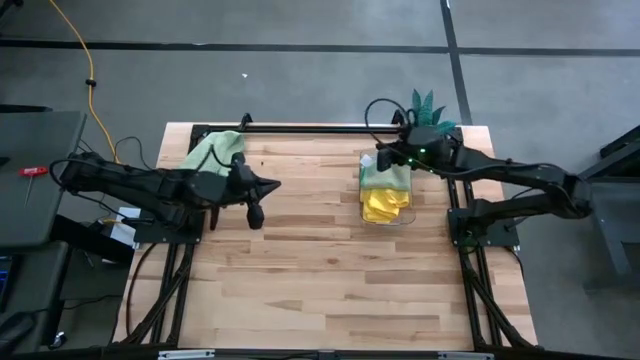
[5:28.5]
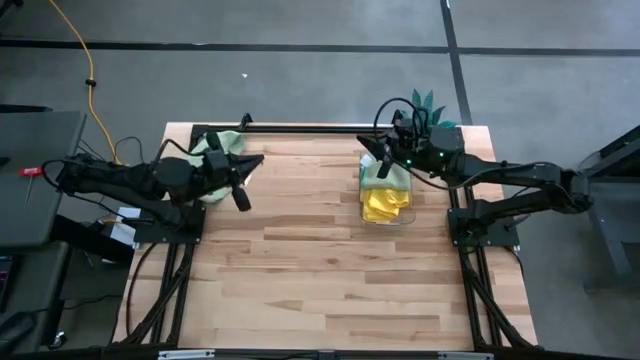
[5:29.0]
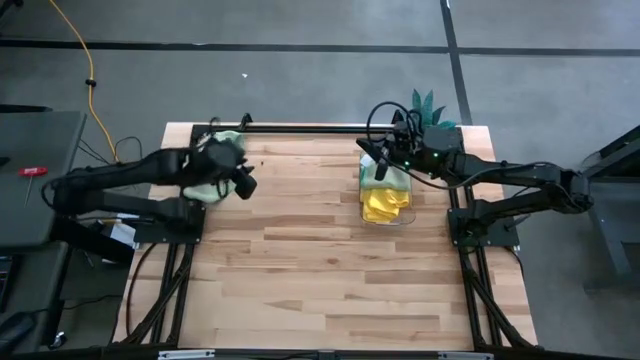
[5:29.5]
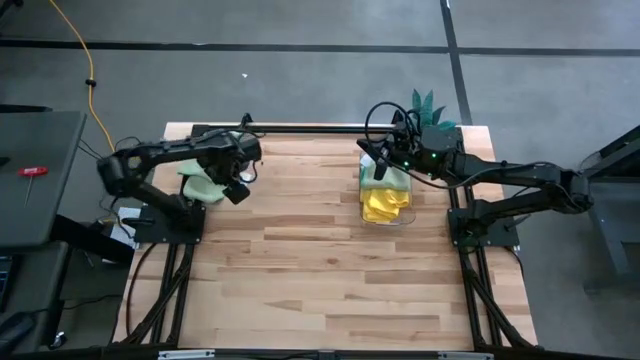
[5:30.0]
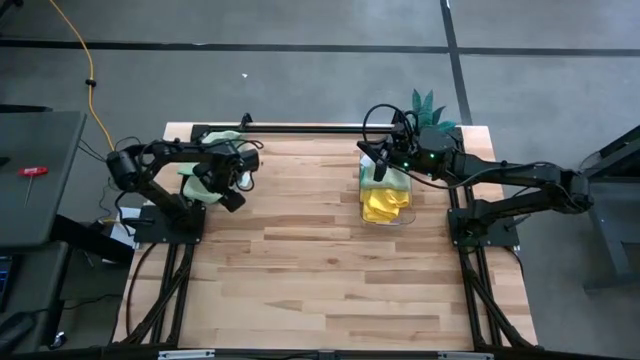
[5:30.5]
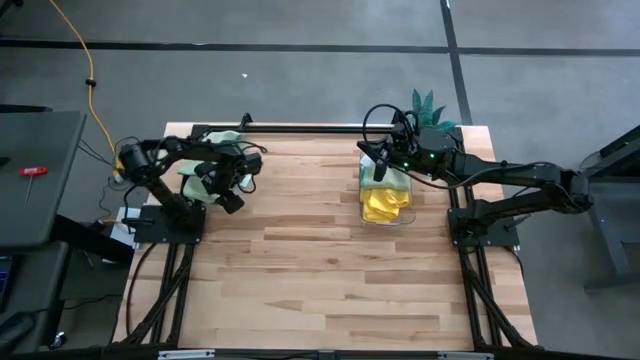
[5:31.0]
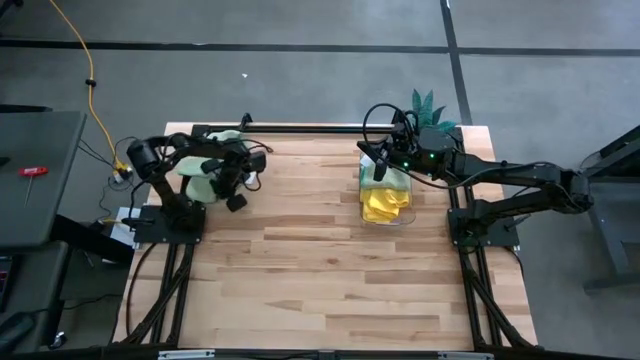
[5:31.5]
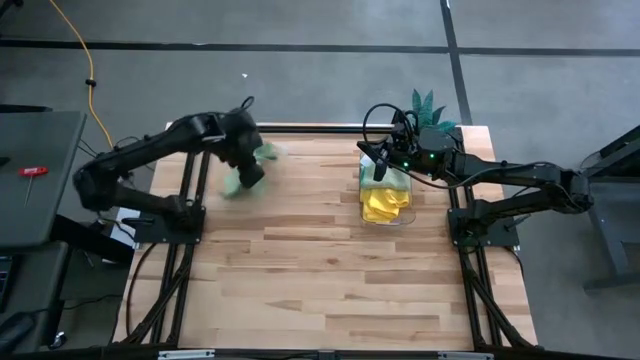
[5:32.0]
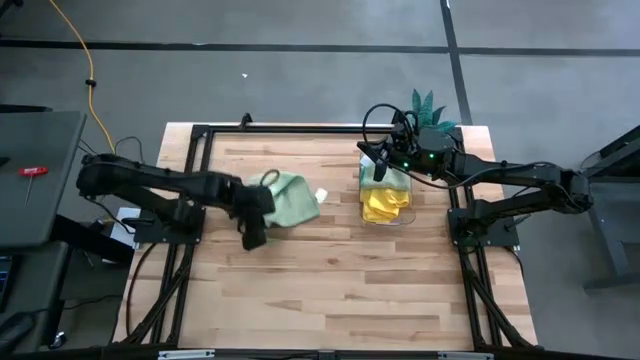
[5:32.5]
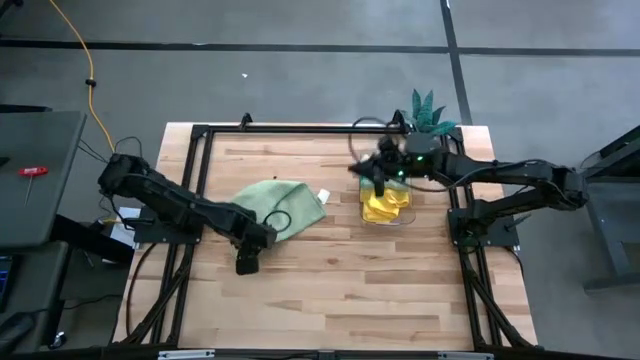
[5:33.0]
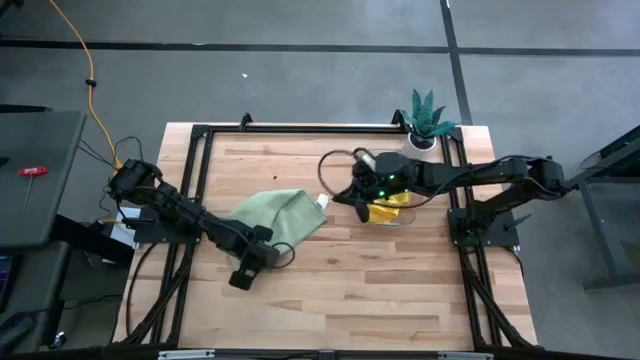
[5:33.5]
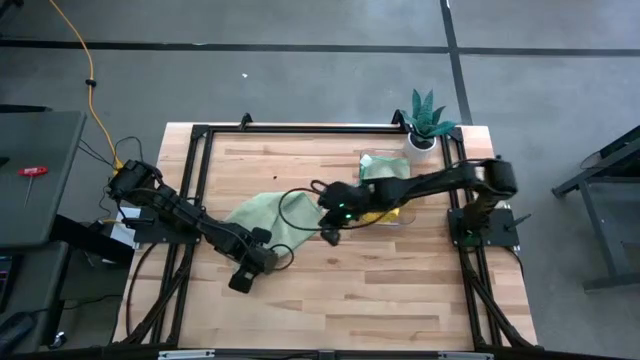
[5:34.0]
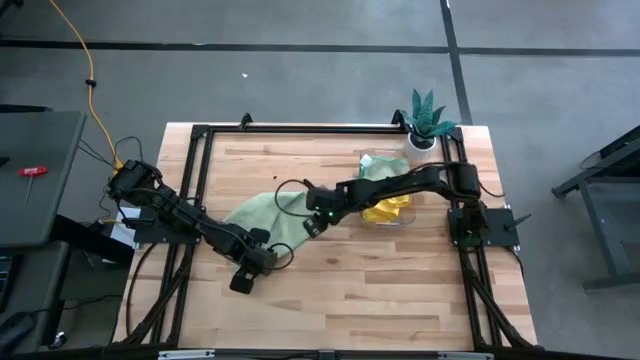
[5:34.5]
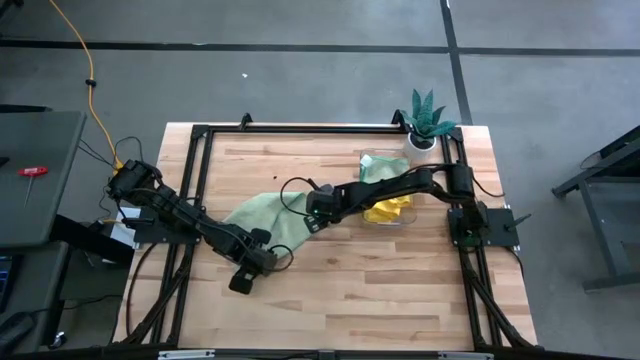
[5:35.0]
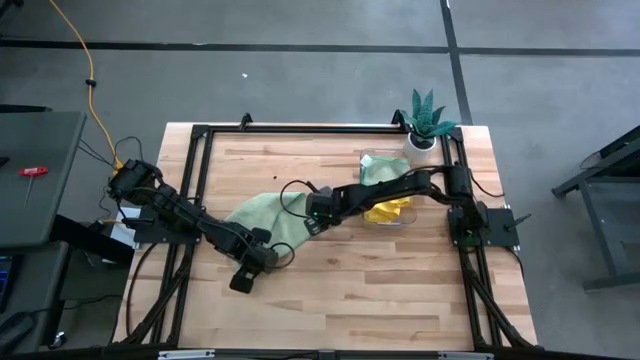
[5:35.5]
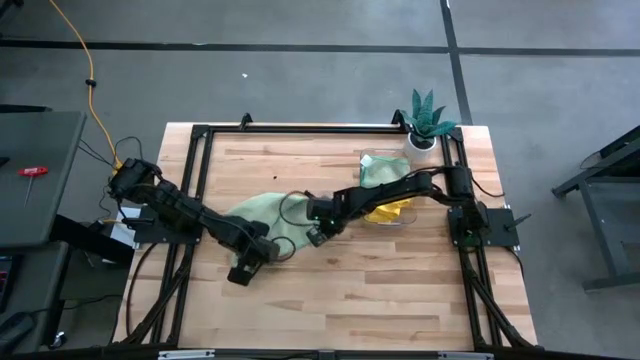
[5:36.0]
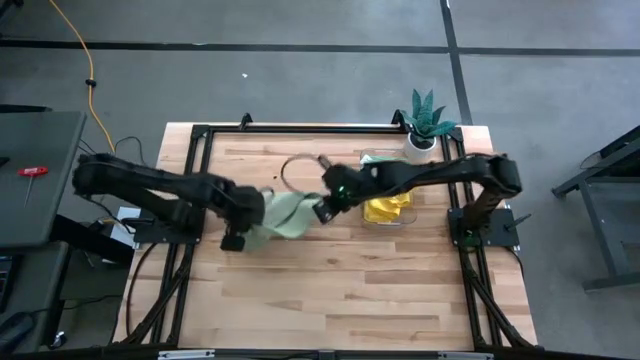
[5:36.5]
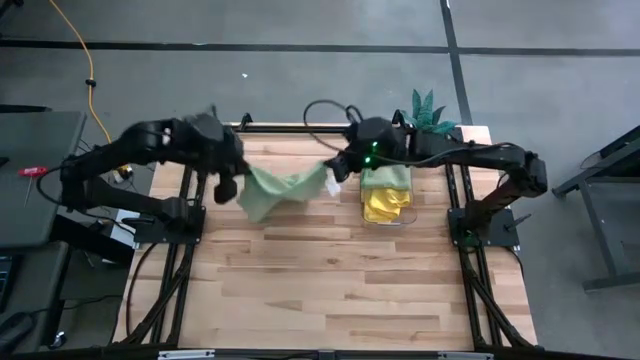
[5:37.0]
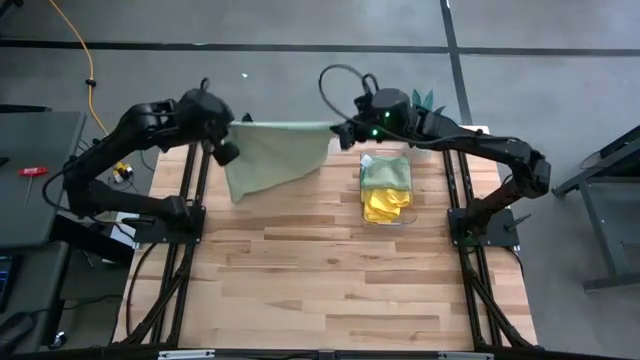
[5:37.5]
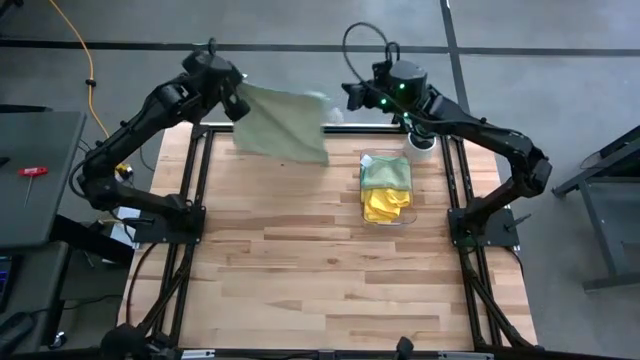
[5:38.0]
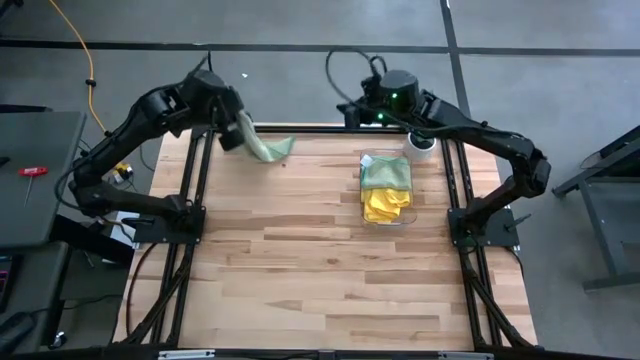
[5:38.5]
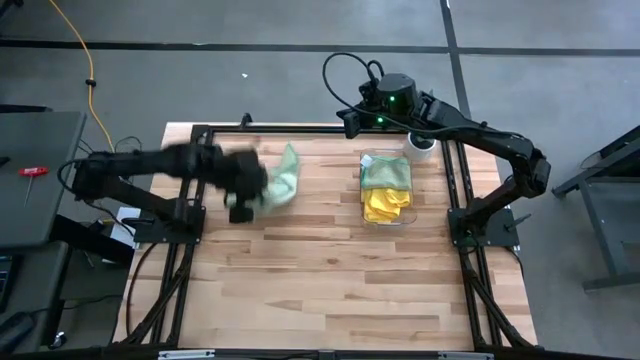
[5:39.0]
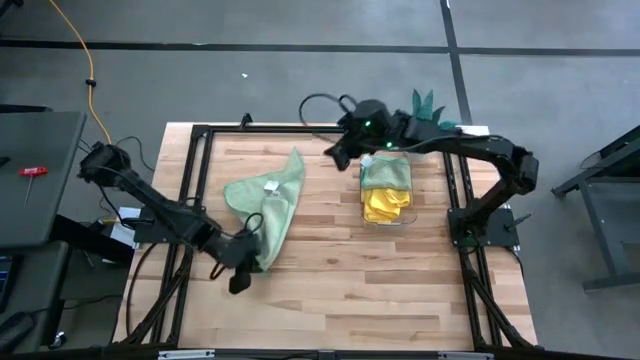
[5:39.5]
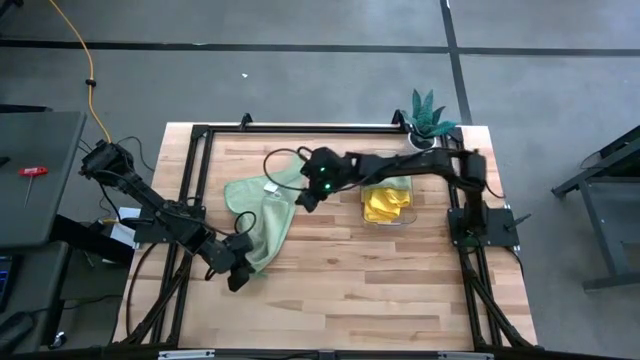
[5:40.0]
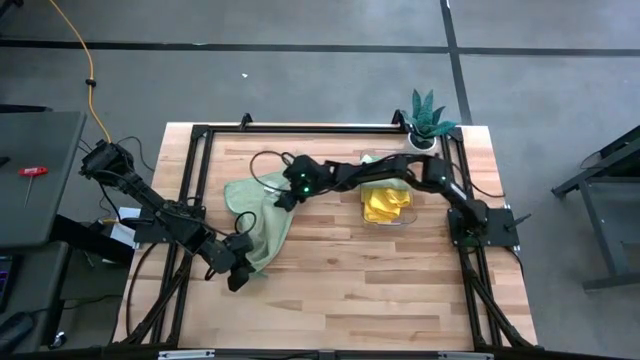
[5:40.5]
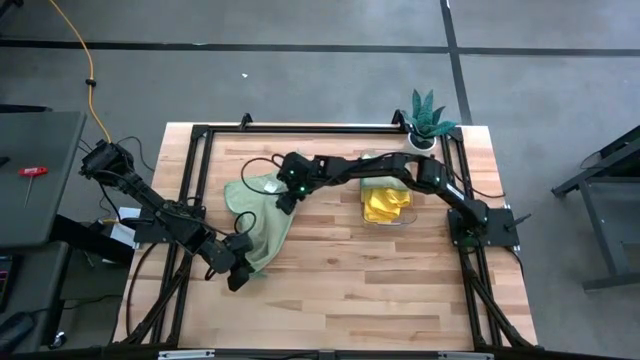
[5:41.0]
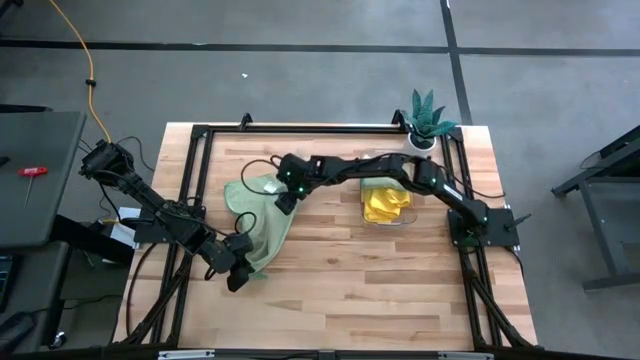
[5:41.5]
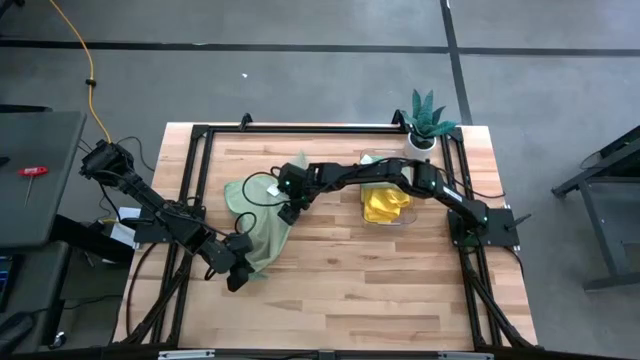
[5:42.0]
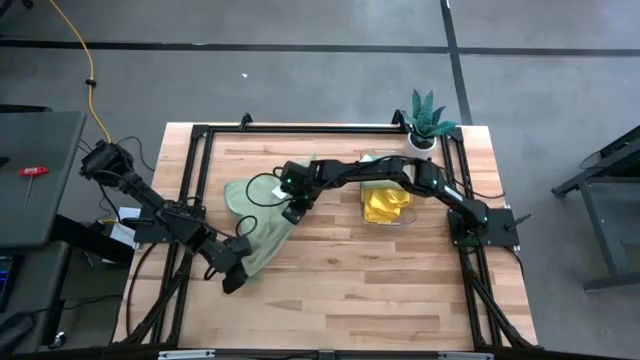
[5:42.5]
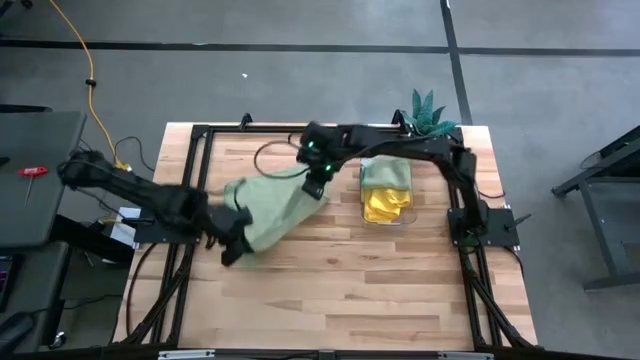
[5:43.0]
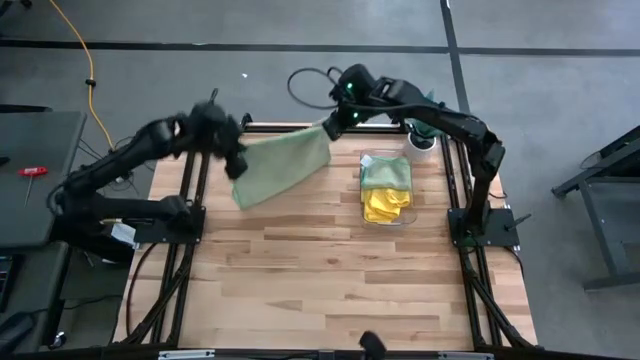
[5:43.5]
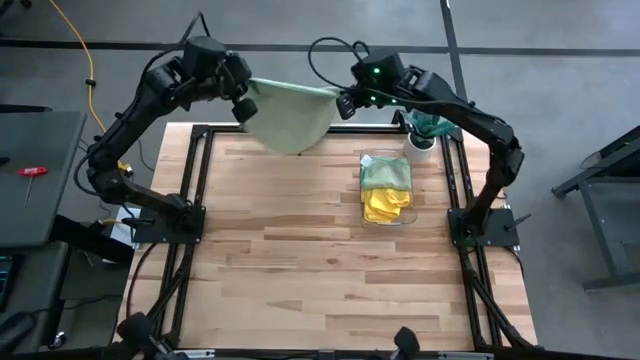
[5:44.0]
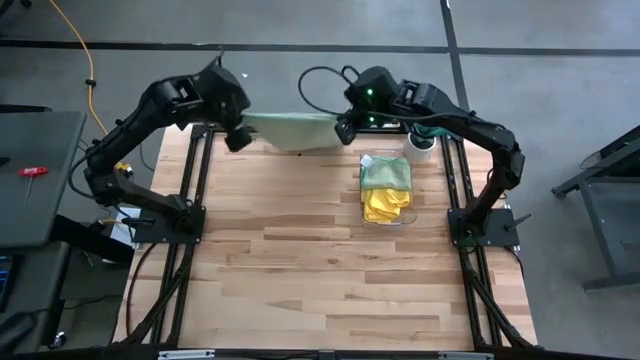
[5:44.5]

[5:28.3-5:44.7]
Task: Fold microfiber towels
Fold the green microfiber towel

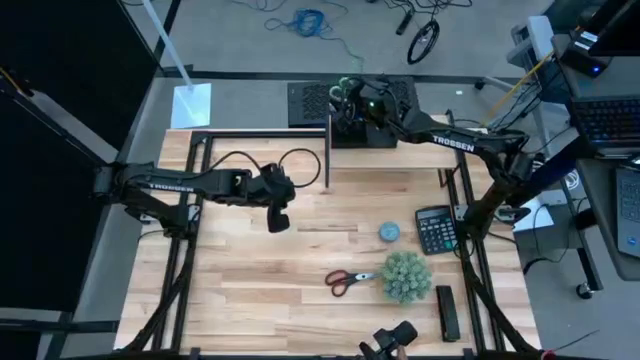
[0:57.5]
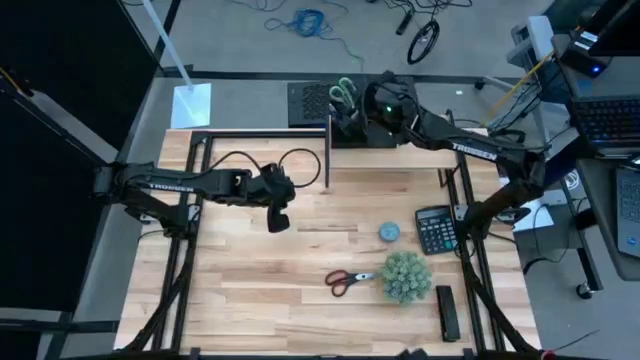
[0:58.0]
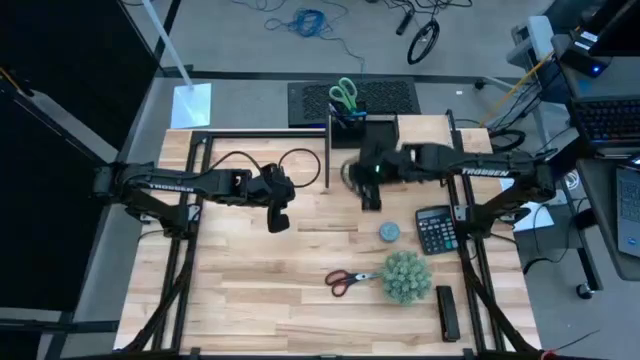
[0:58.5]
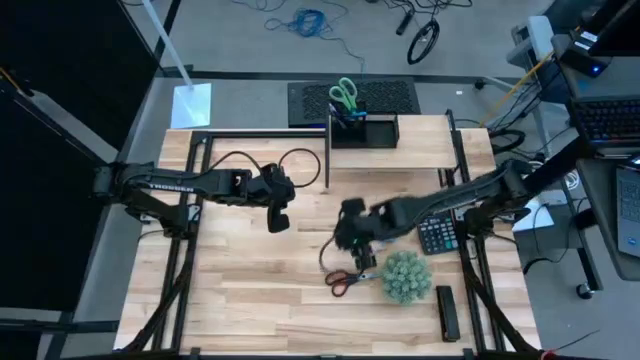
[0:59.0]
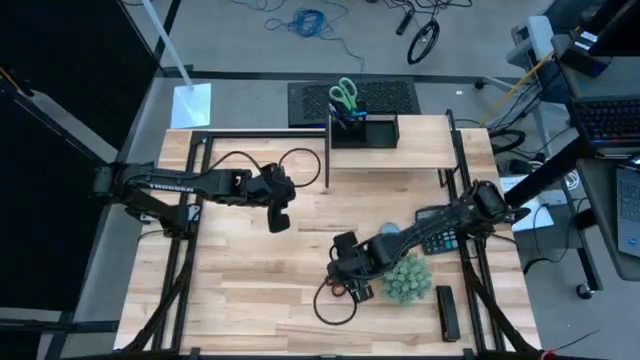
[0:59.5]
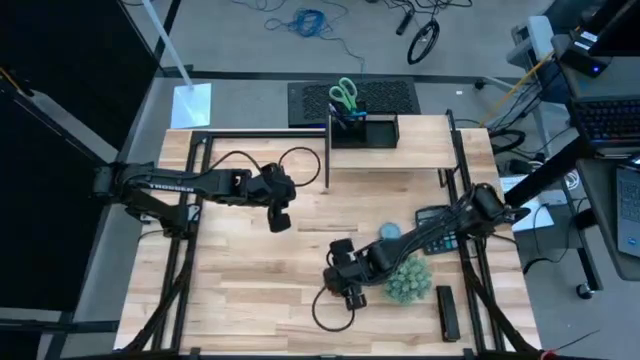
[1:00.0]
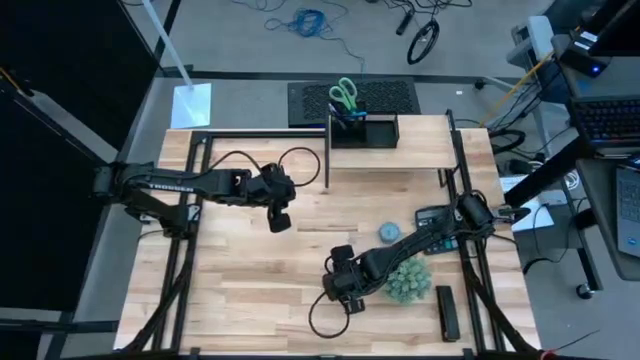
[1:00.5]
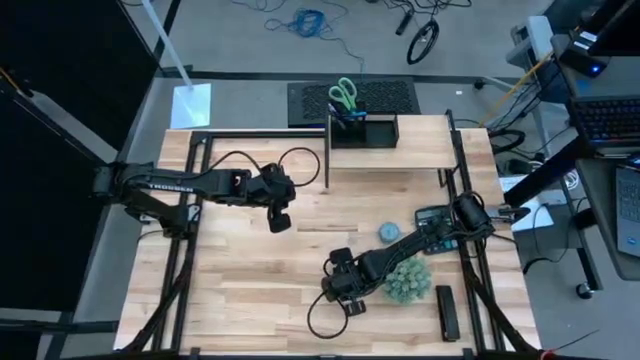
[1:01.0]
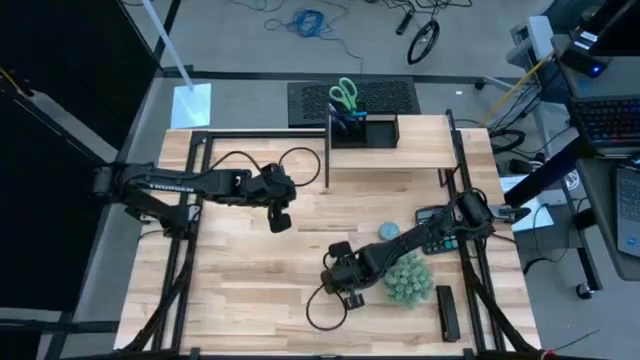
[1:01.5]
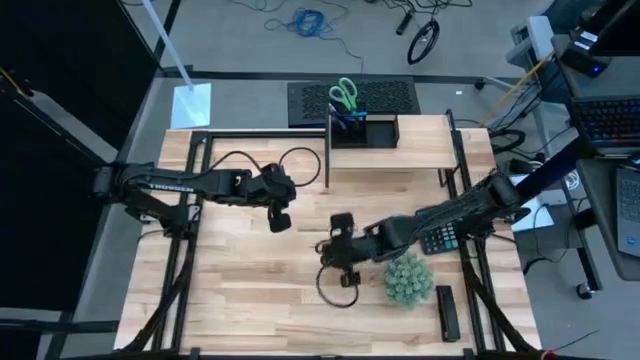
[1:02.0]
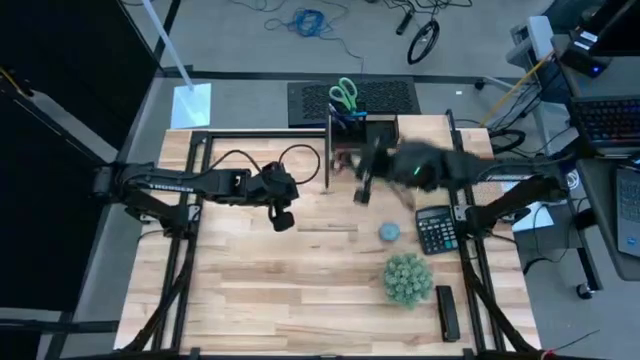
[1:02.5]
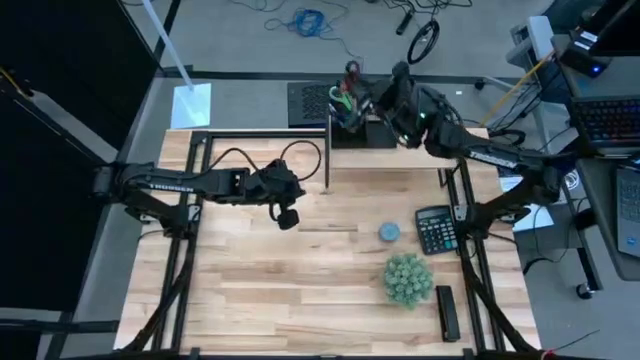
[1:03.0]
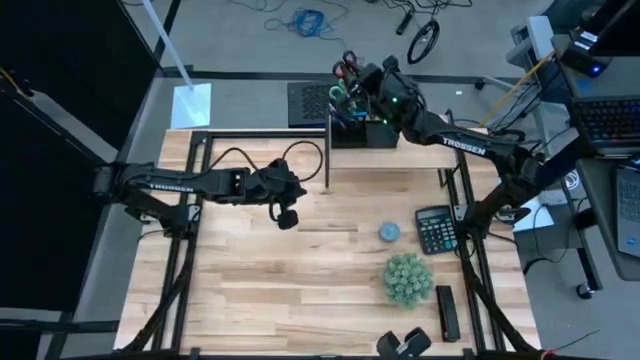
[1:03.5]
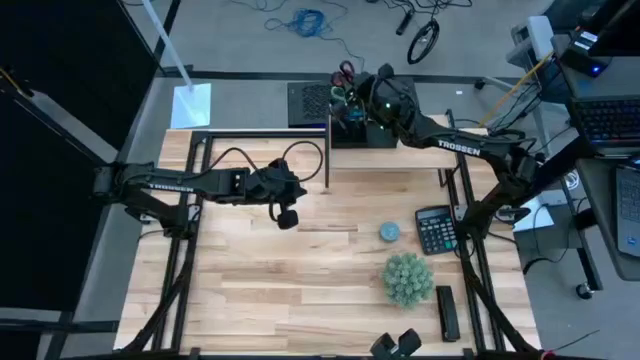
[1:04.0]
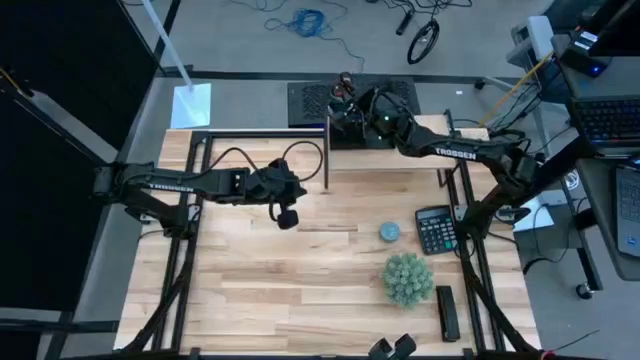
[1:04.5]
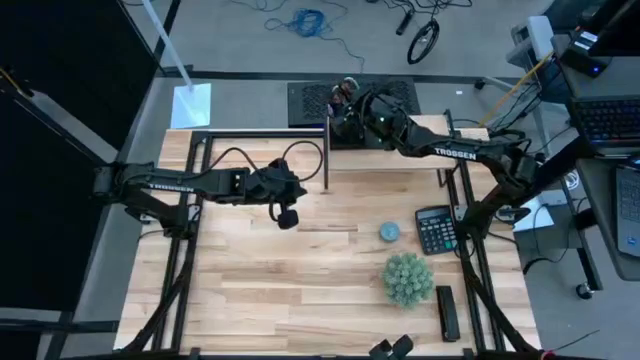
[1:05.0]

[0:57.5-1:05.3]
Task: Pick and place office supplies into organizer
Put the black scissors into the black desk organizer on the shelf
